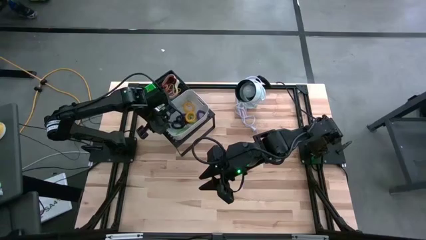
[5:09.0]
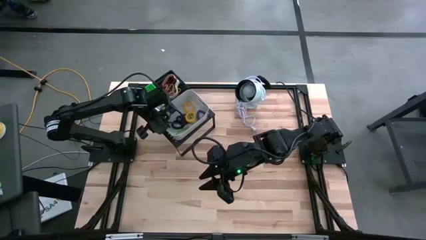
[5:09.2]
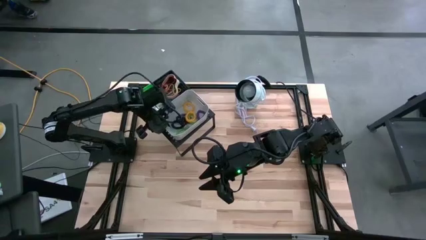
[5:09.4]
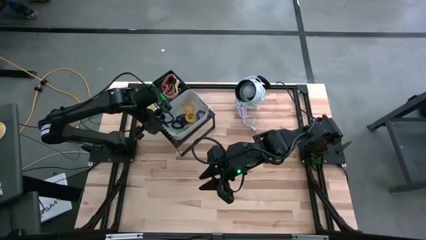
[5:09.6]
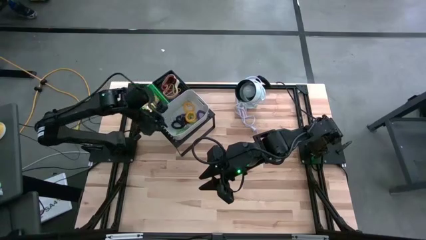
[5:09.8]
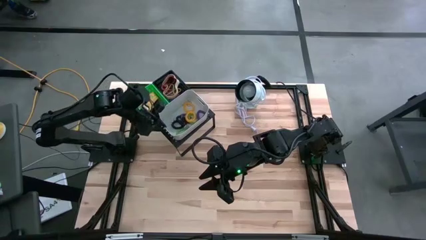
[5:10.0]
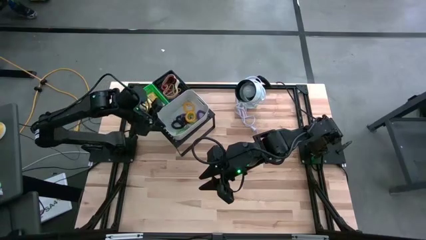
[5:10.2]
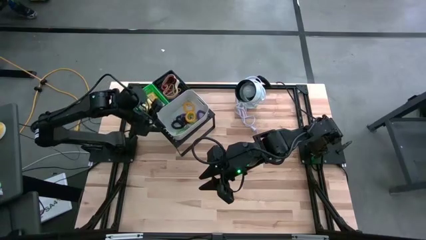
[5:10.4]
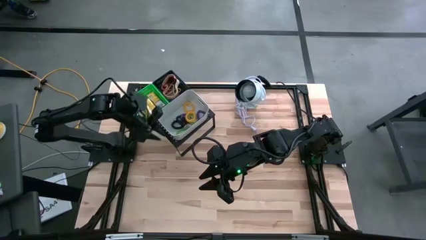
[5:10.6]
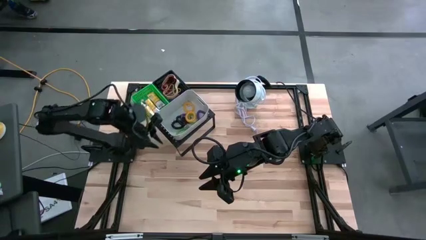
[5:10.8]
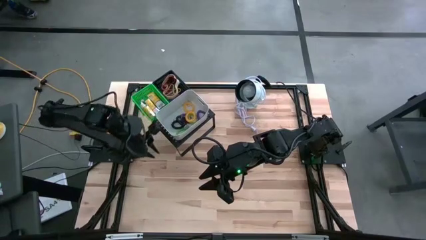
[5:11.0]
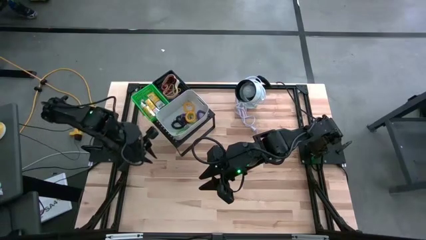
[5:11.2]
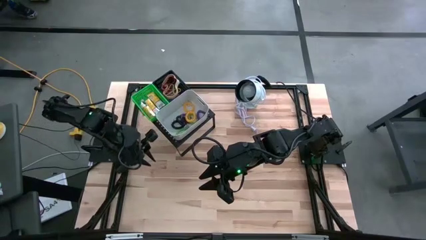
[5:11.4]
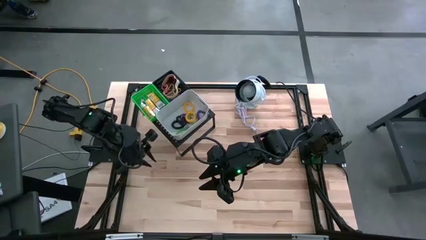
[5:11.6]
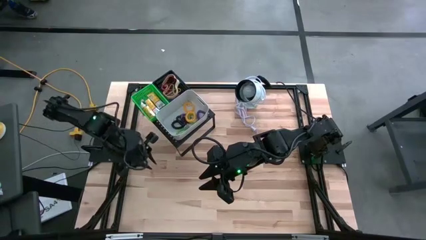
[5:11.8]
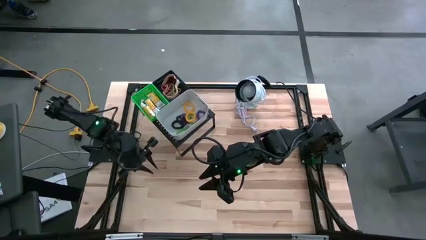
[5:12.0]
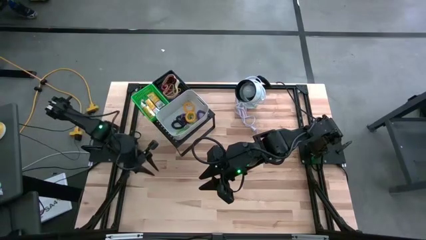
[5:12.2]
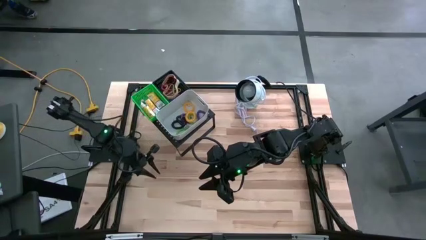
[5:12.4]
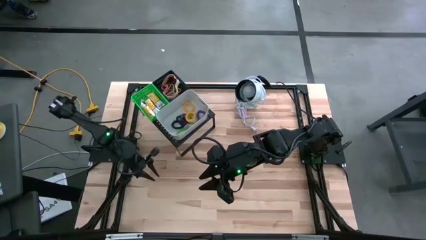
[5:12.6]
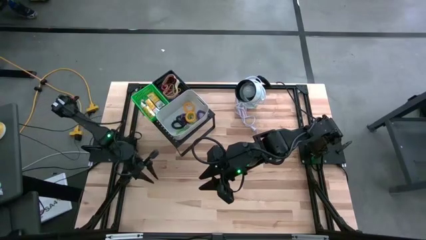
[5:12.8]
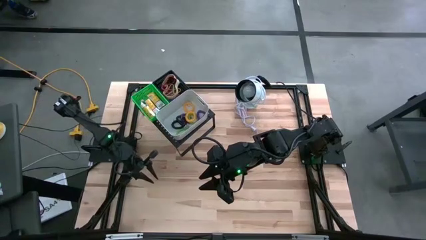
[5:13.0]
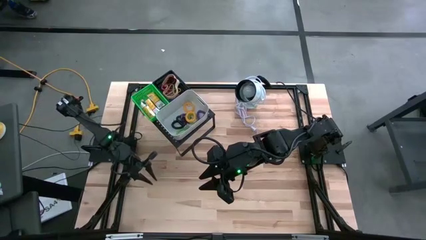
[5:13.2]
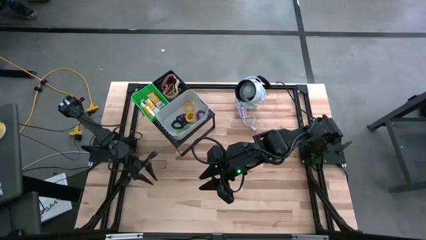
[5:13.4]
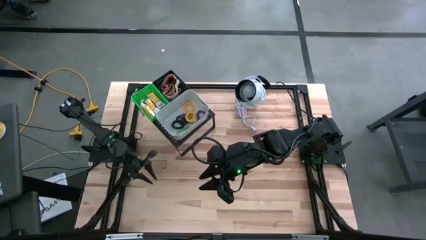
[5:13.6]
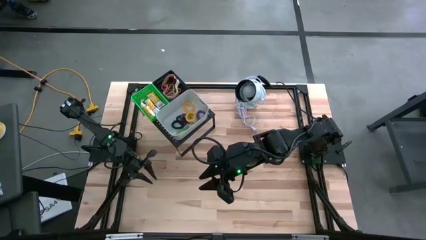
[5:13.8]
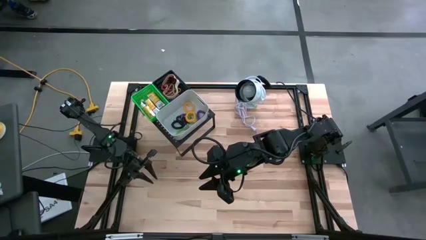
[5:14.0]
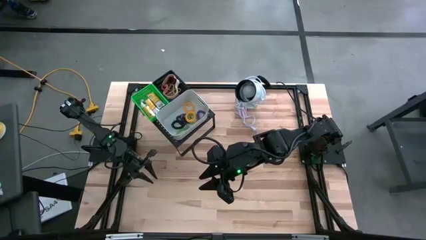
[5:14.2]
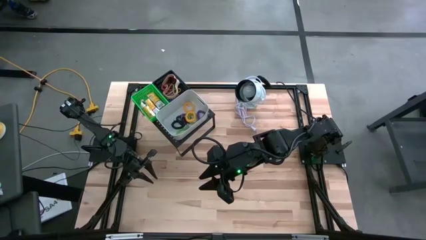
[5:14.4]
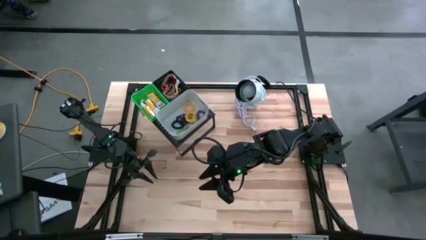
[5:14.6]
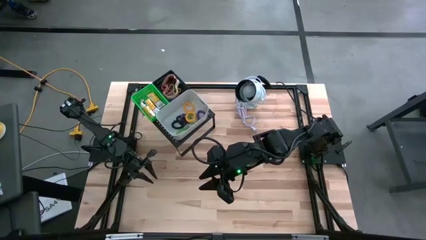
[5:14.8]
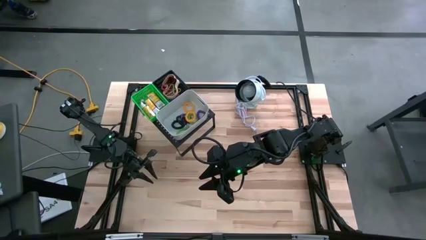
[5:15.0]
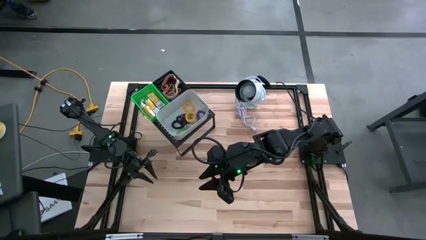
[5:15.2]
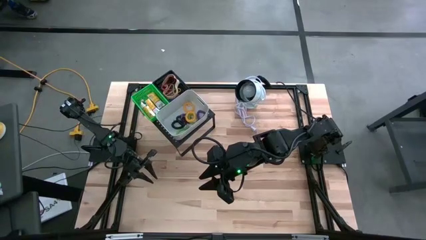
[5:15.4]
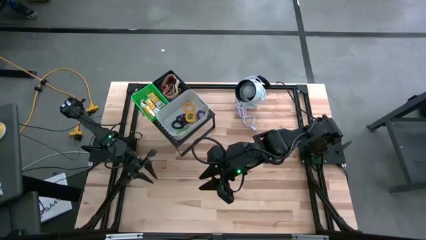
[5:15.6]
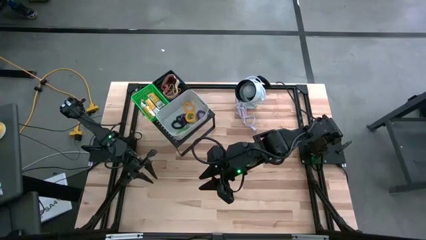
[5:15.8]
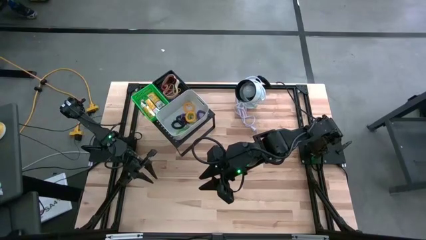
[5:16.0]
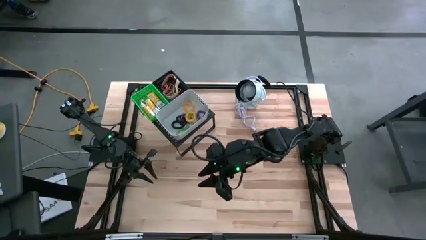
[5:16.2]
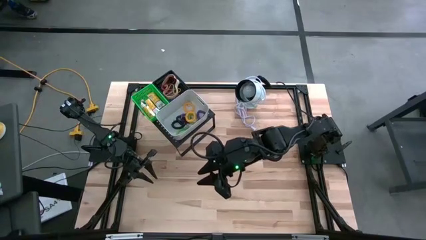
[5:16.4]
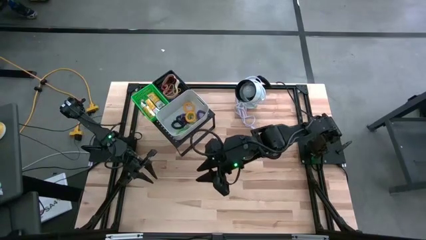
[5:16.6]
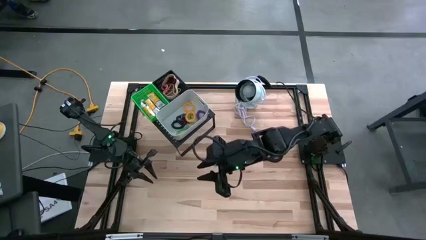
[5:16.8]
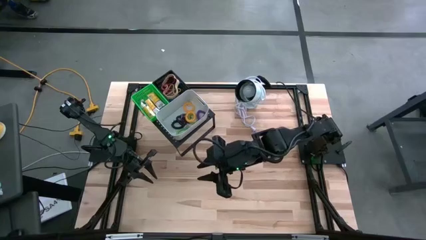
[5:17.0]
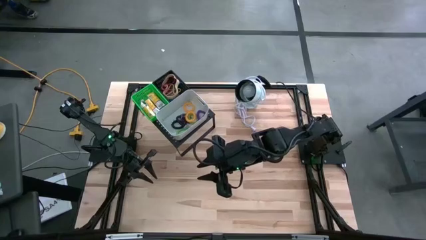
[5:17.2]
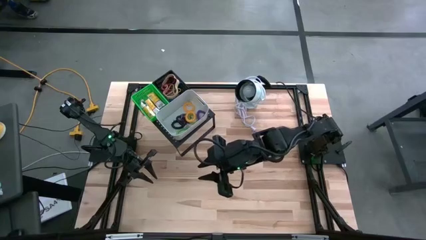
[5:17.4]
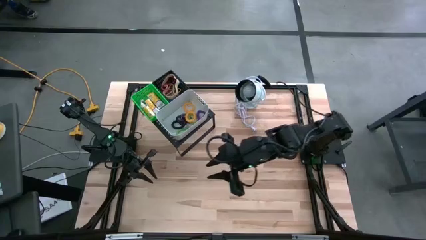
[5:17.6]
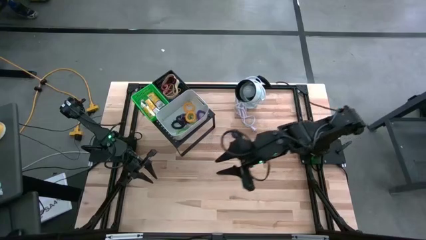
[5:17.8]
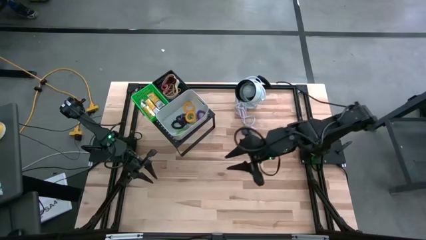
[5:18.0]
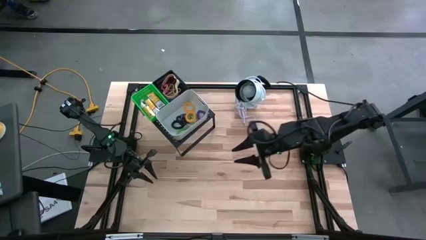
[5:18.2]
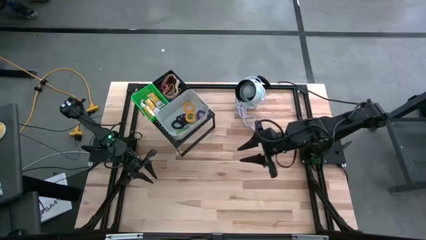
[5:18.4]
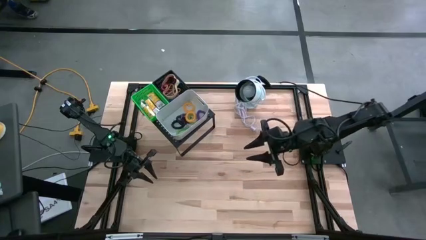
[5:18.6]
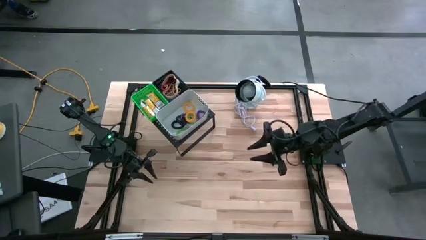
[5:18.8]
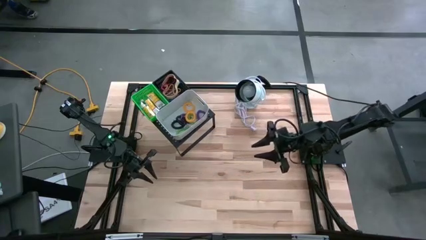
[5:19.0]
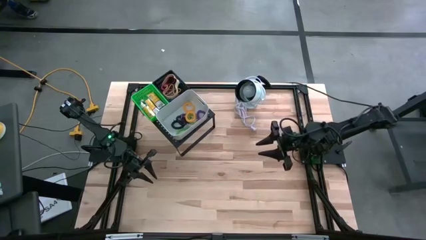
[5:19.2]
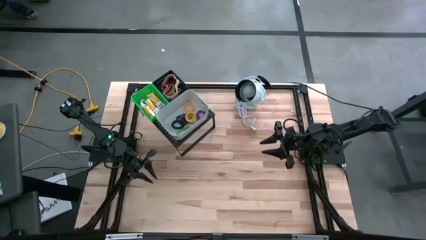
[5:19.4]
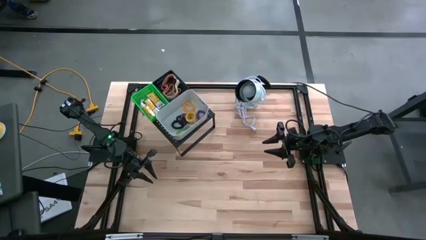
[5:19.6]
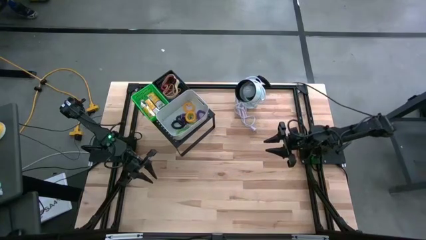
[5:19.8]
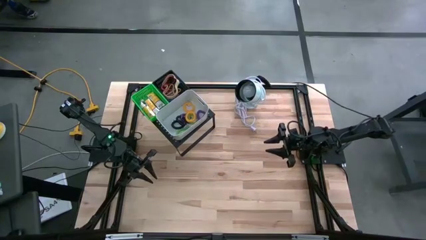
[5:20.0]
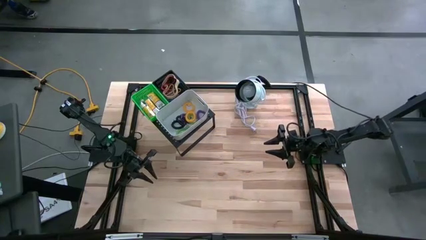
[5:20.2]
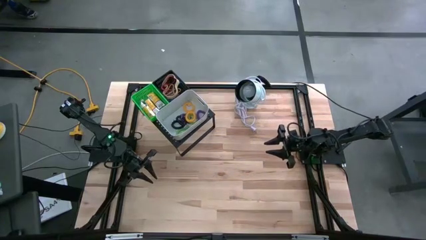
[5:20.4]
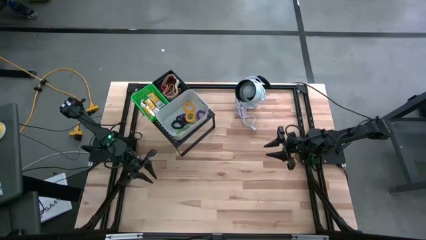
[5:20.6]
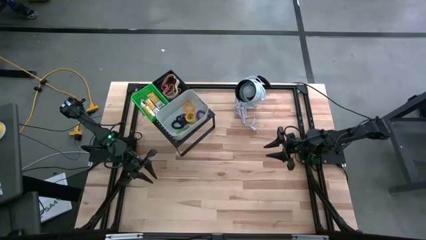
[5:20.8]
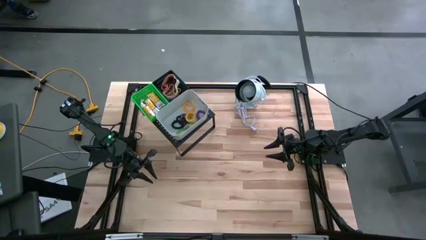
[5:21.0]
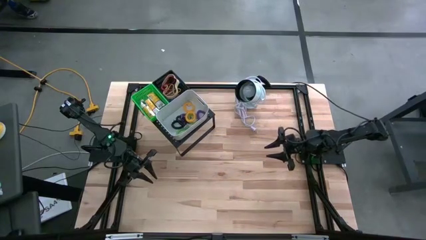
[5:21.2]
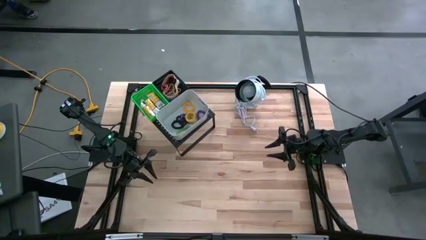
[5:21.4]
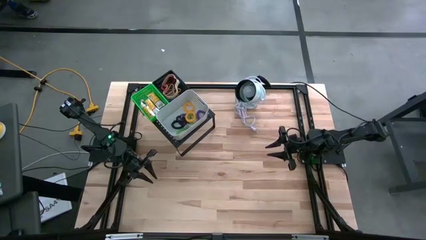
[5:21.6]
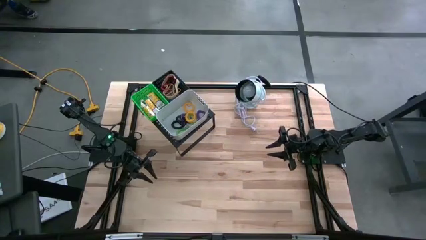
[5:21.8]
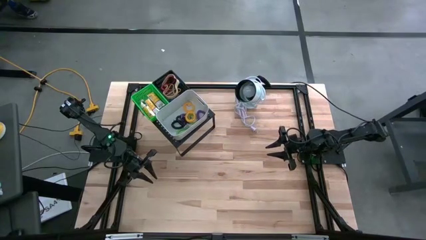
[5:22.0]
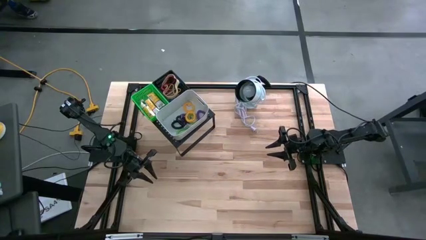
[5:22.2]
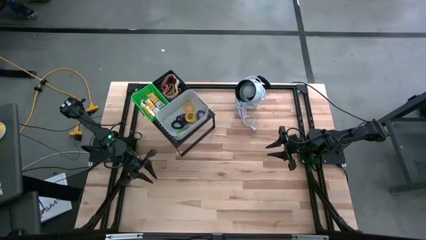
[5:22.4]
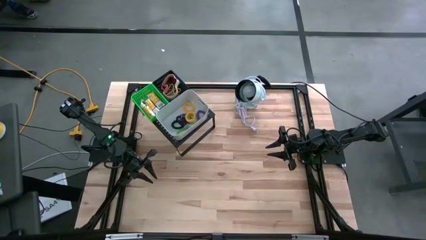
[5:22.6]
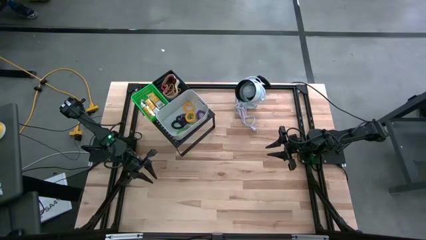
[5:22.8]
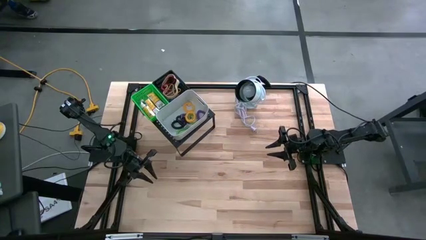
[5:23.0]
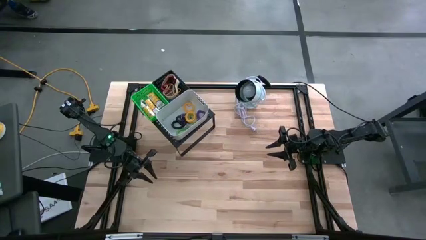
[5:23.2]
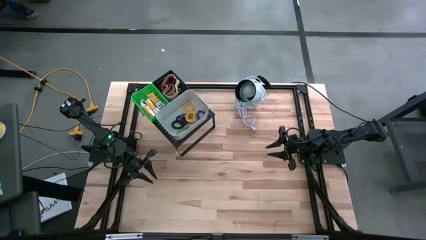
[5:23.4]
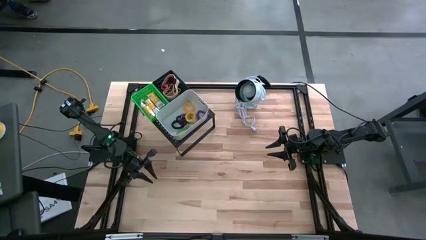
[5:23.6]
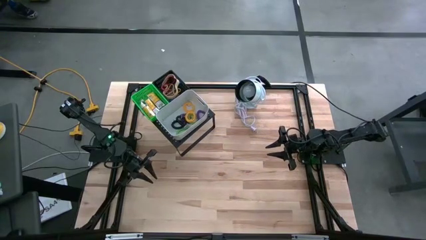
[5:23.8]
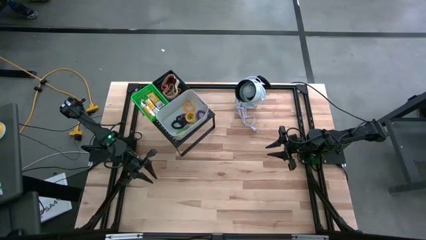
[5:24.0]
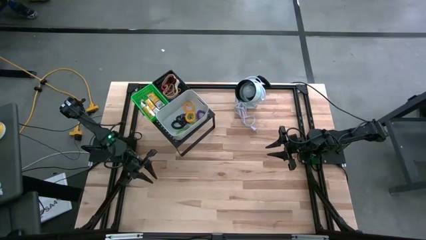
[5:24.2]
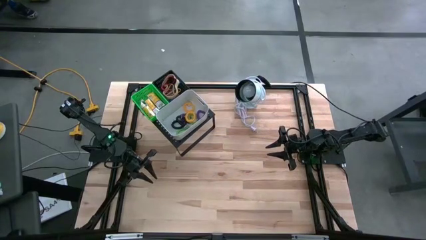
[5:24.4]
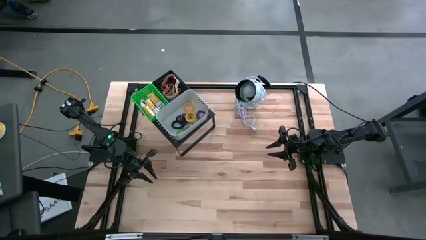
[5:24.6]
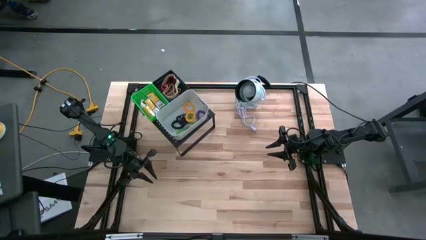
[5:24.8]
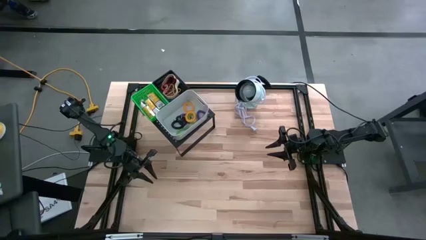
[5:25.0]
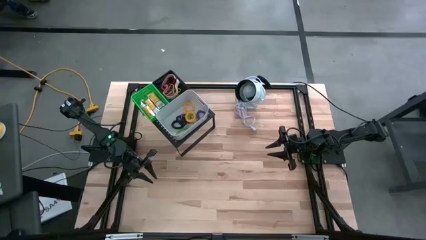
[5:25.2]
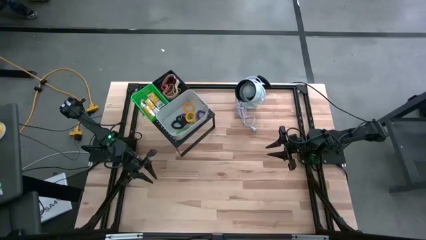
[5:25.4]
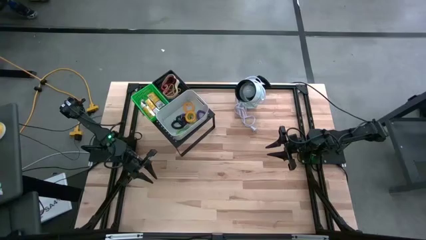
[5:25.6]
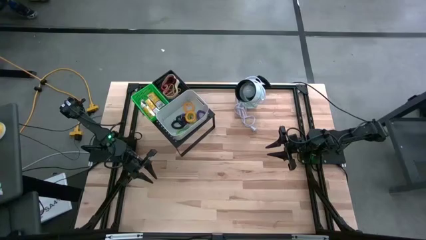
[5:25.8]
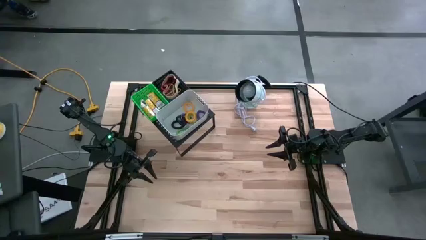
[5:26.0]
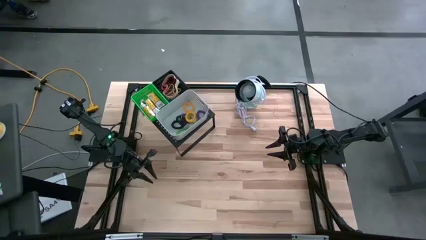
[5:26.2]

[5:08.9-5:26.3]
Task: Pick & Place Office Desk Supplies
Return to Home Position
